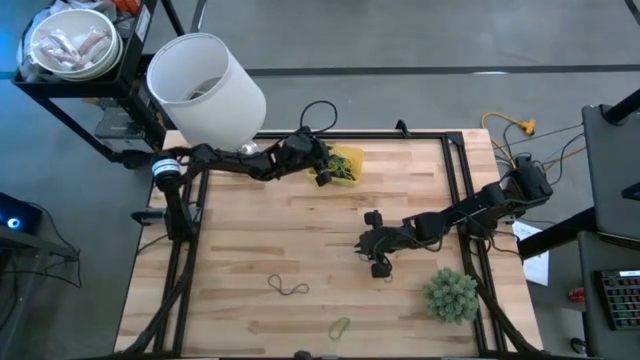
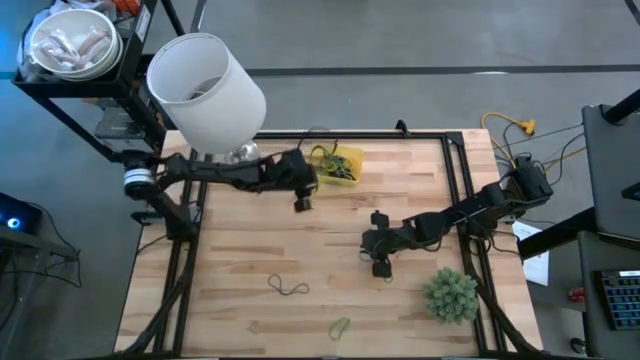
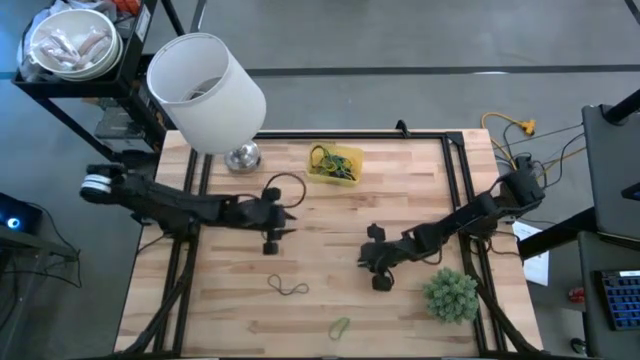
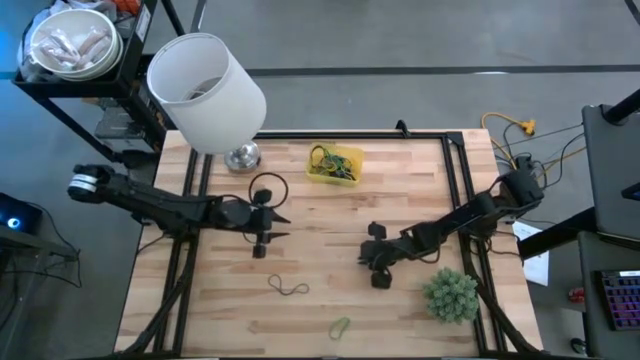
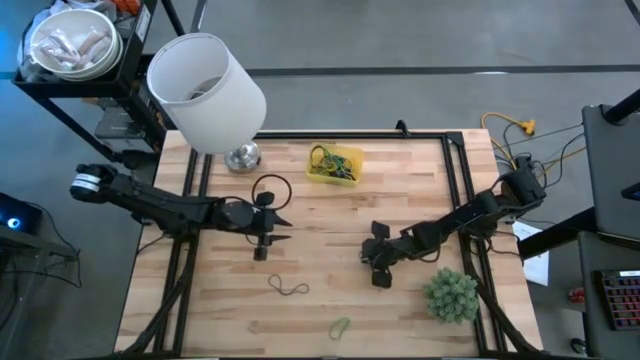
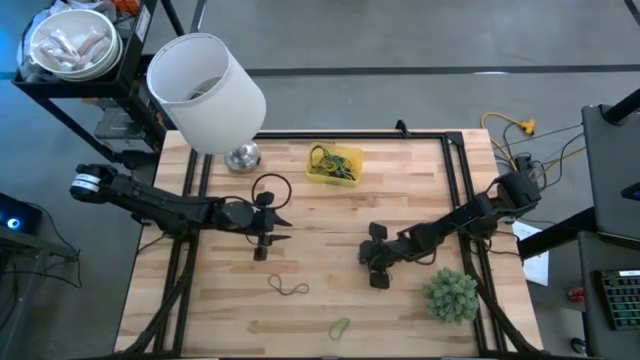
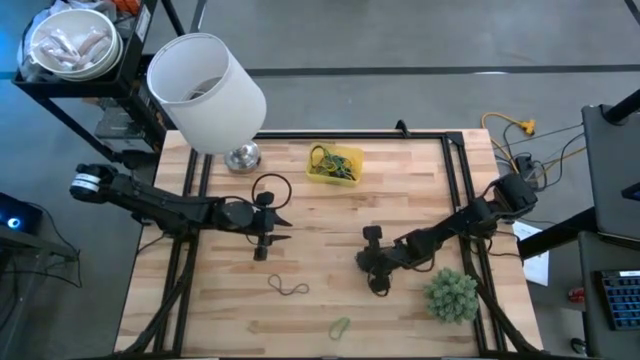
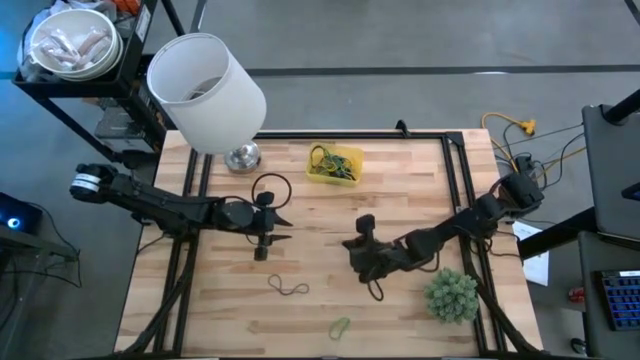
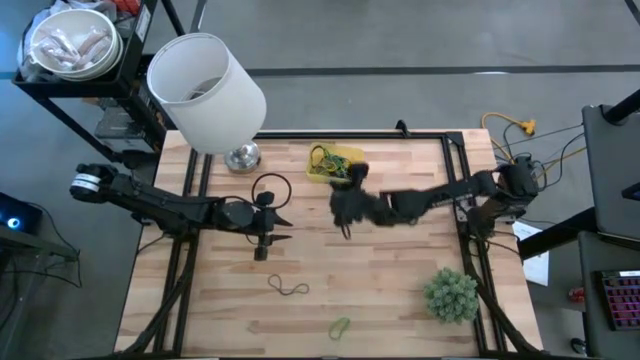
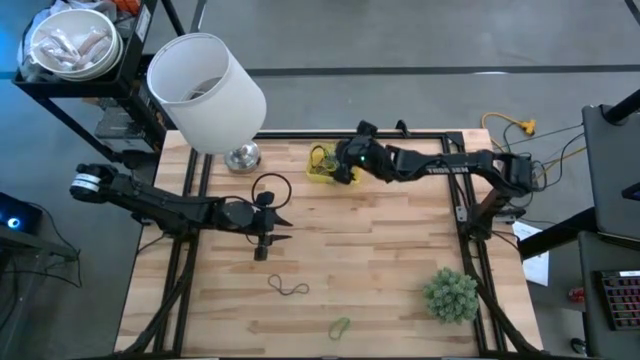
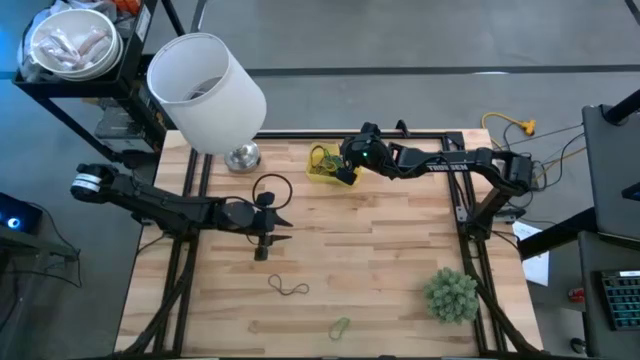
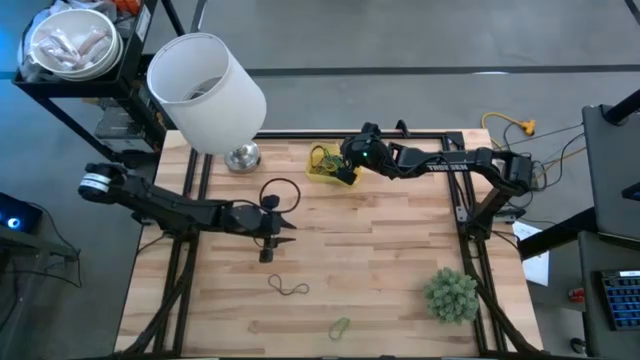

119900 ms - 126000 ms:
Task: Pick and place rubber bands into bin
Put the blue rubber band into the yellow bin

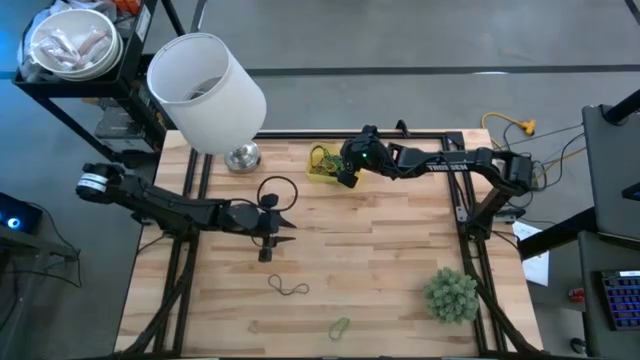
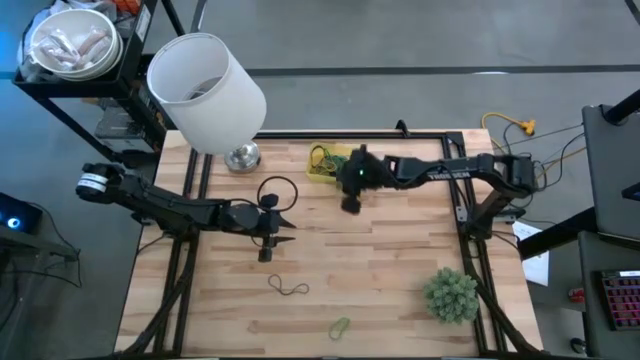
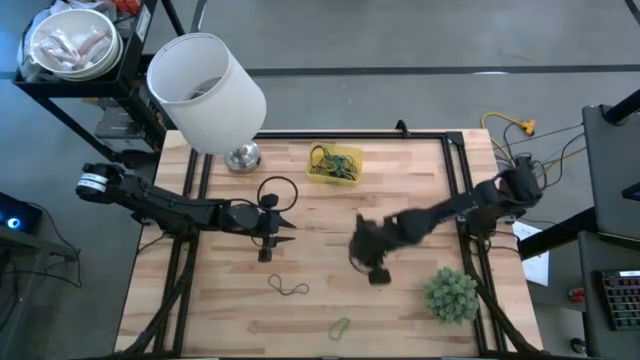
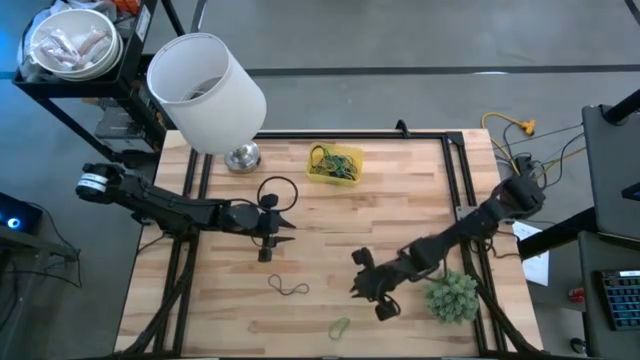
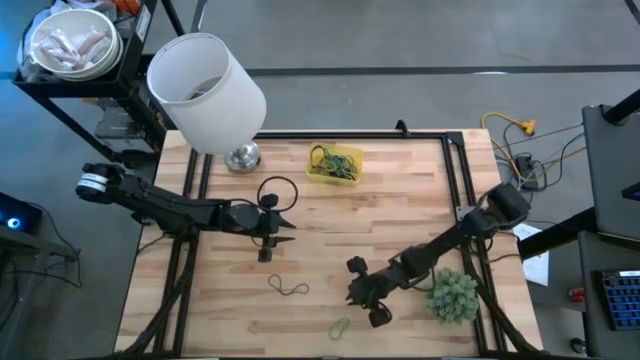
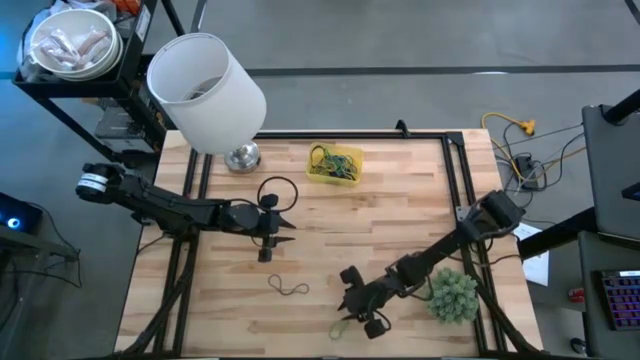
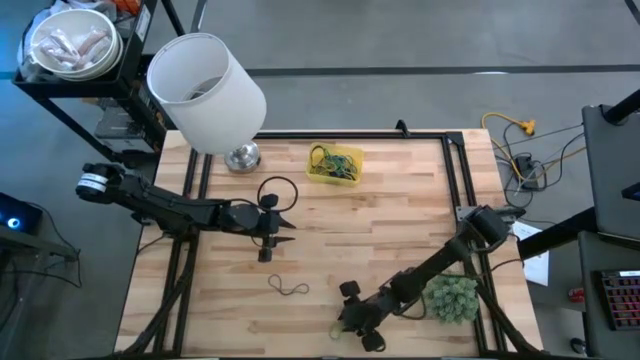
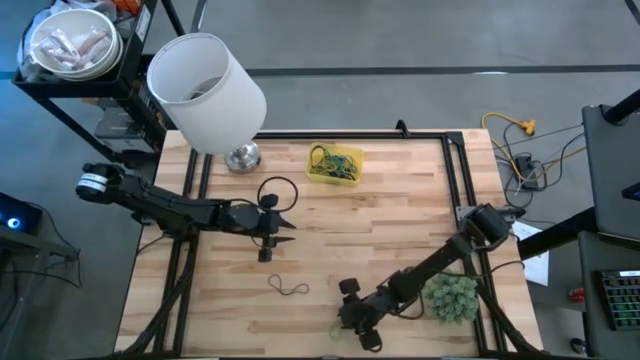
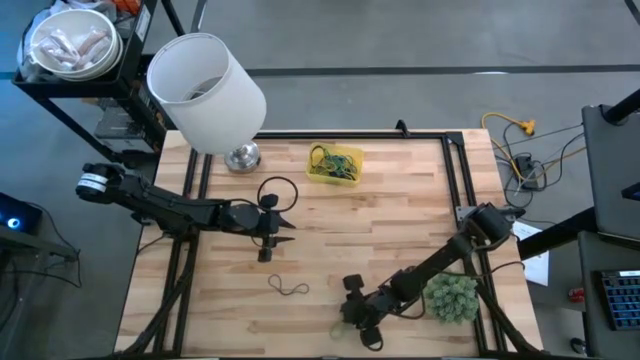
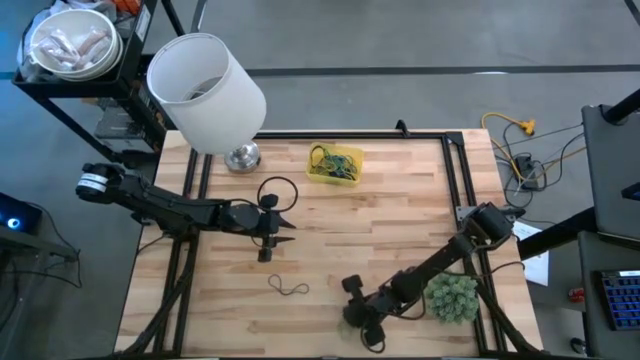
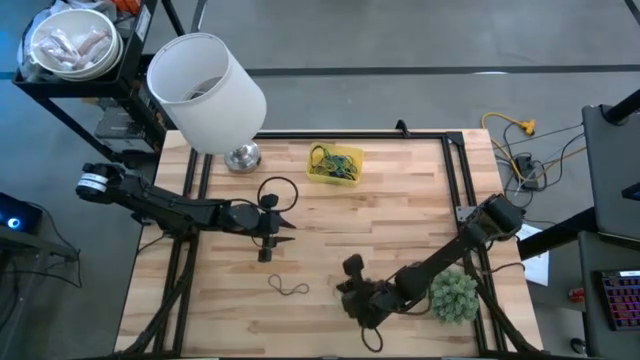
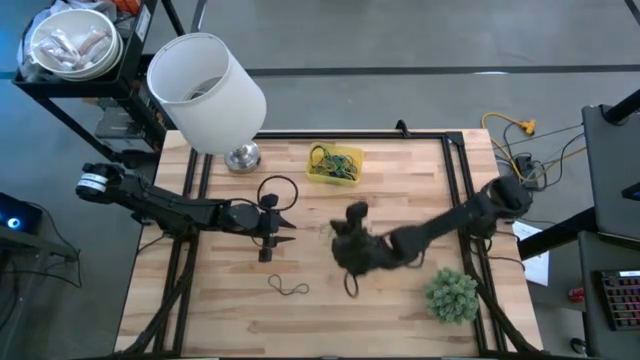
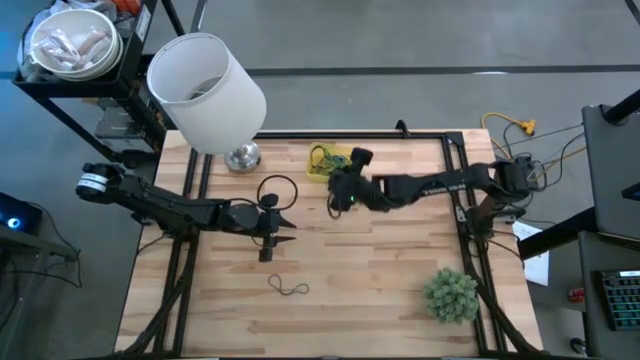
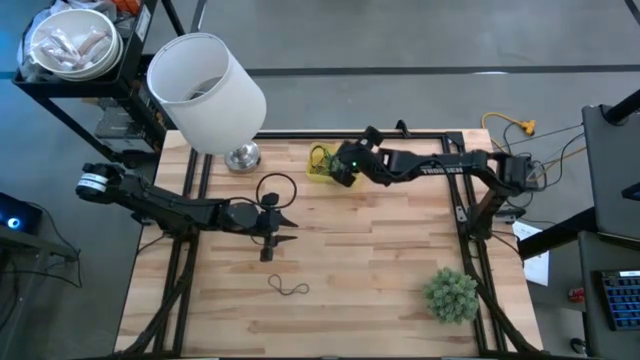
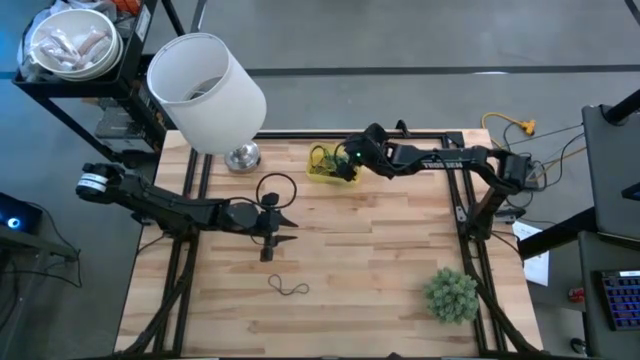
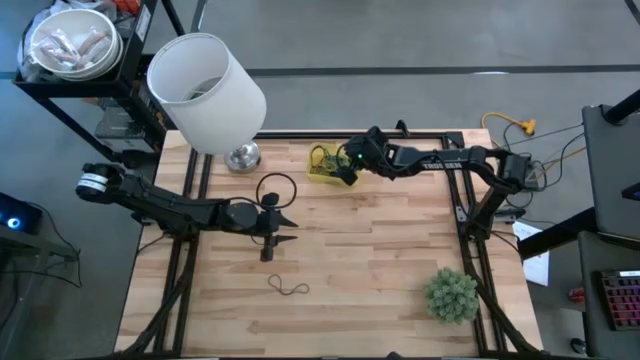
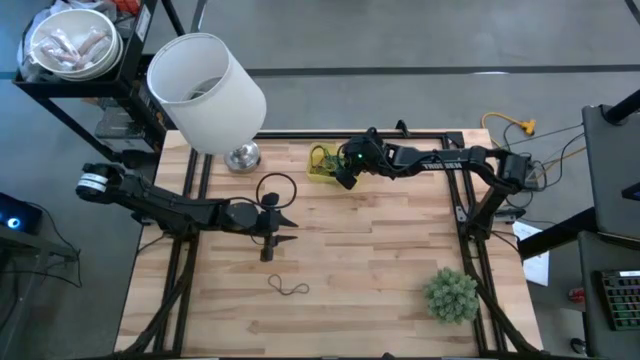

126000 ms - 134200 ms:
Put the green rubber band into the yellow bin

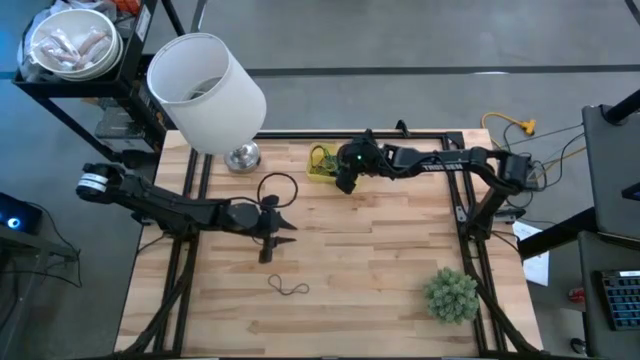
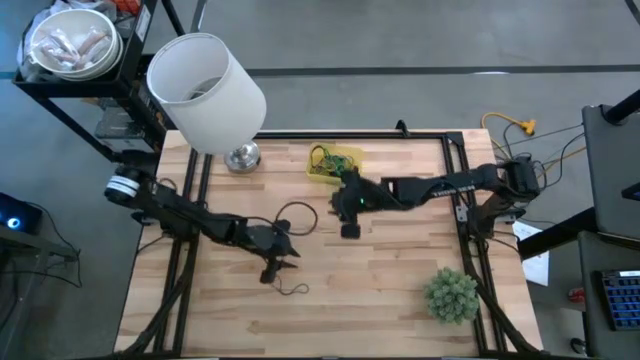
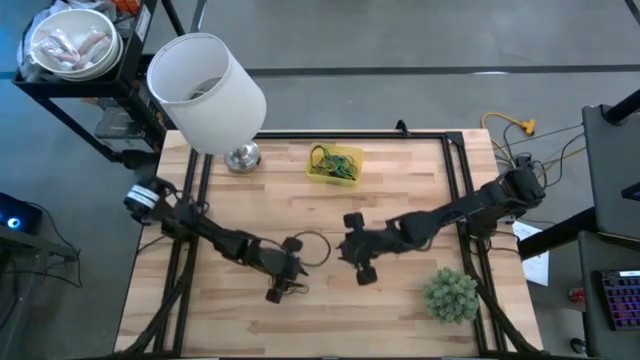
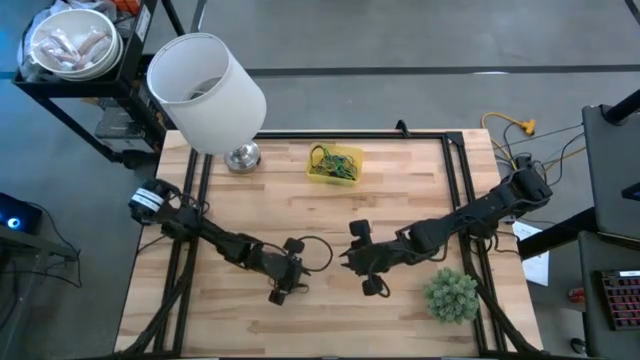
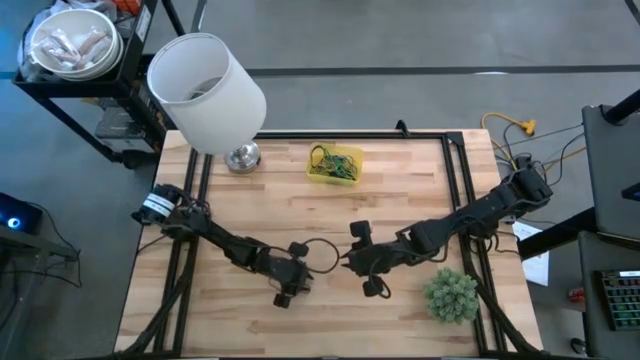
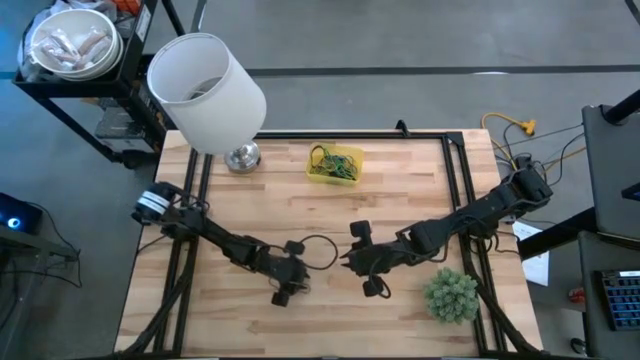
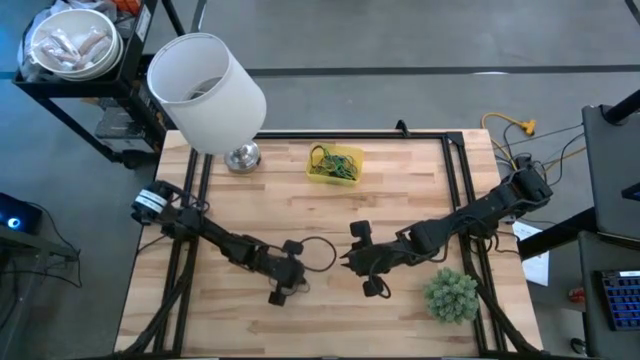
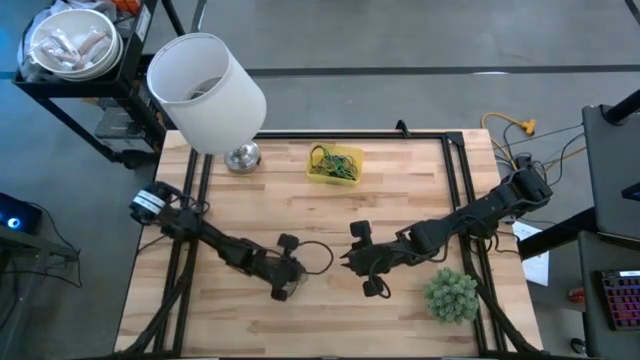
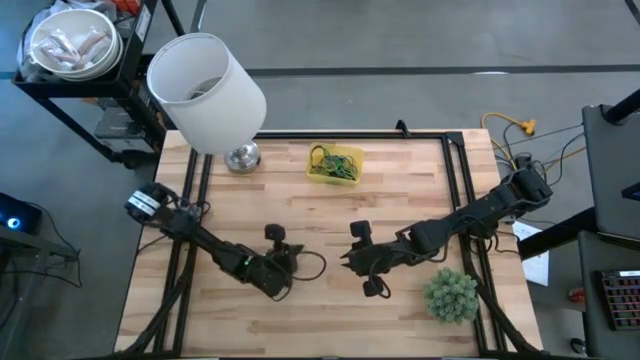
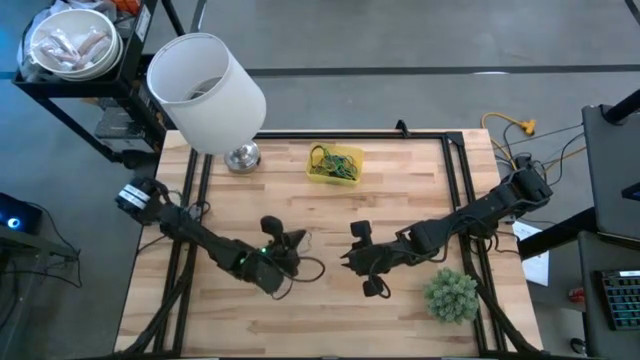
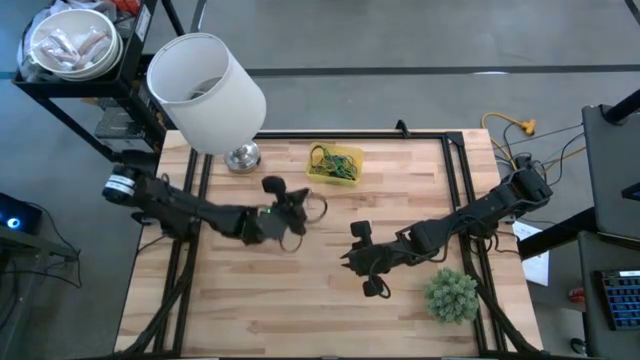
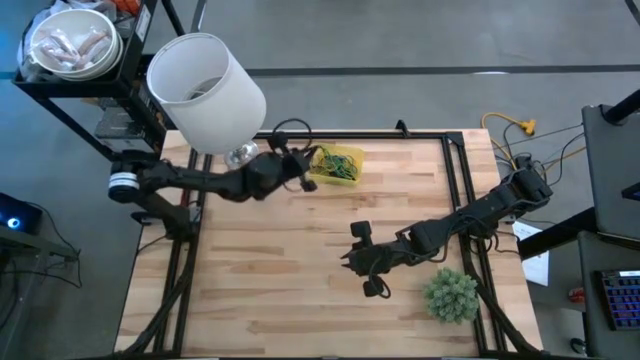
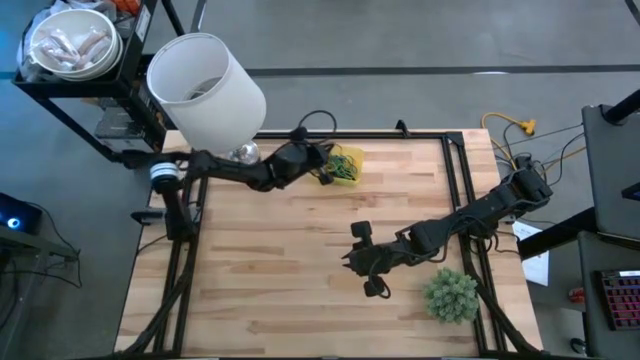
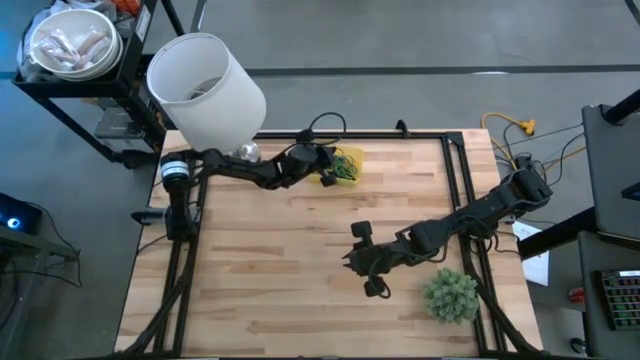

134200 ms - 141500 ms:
Put the purple rubber band into the yellow bin
